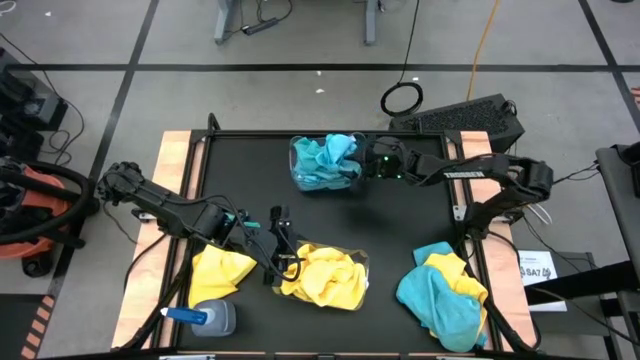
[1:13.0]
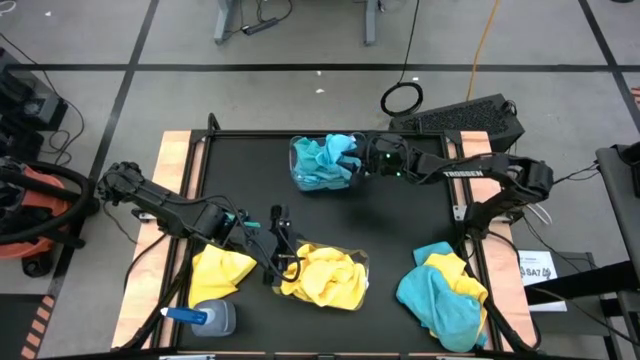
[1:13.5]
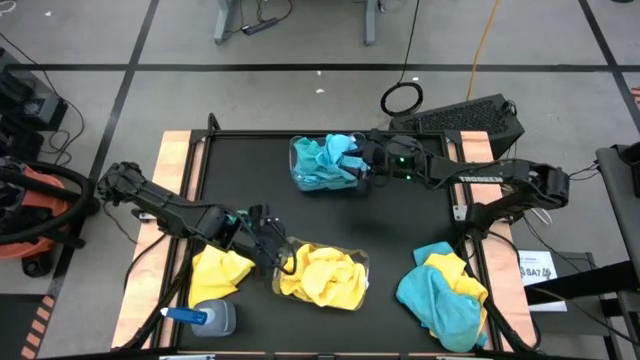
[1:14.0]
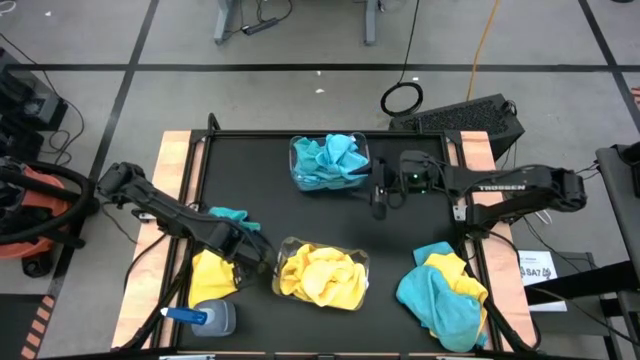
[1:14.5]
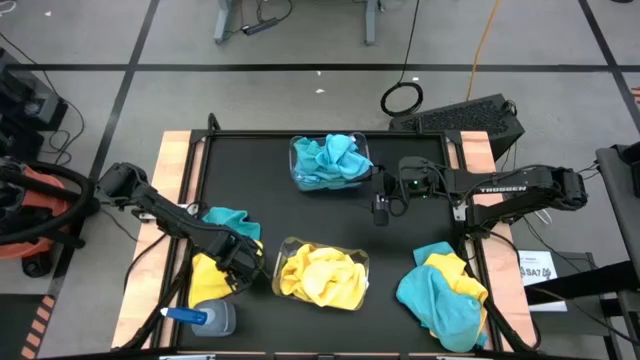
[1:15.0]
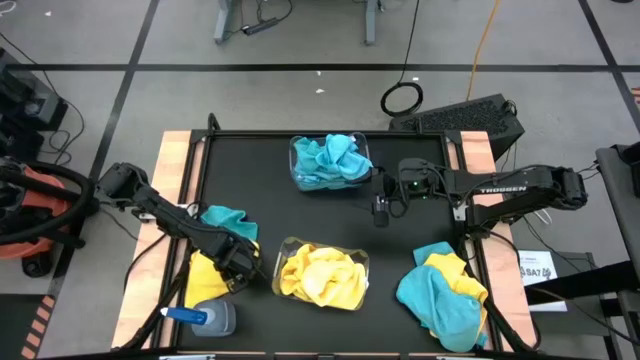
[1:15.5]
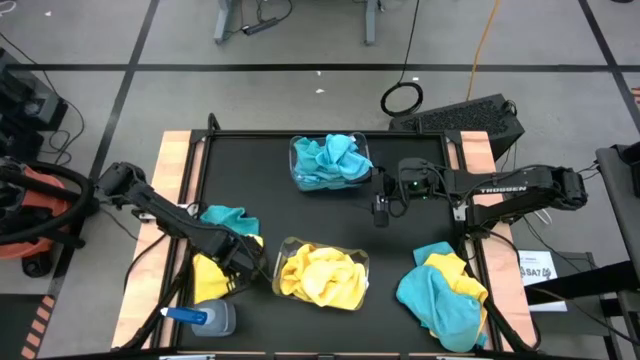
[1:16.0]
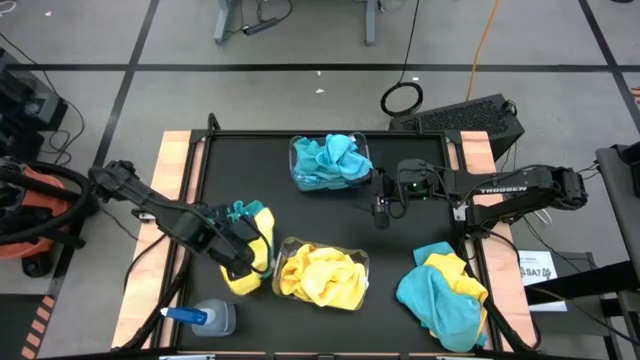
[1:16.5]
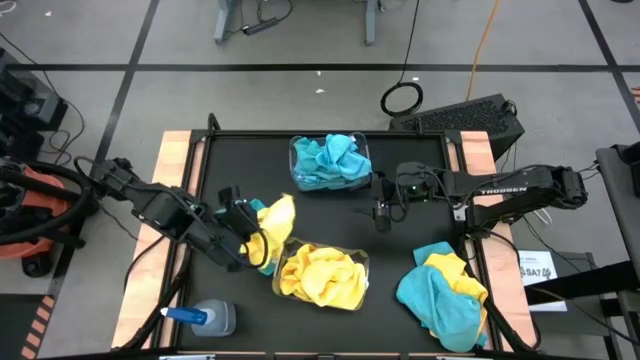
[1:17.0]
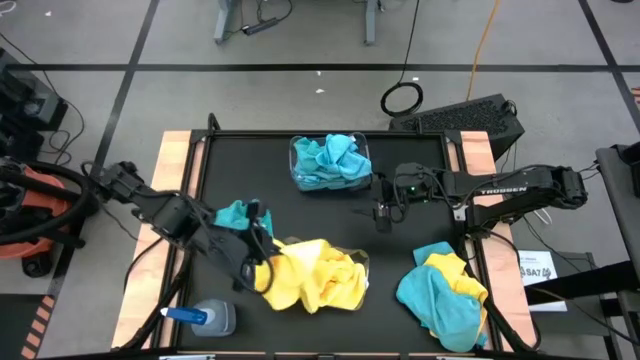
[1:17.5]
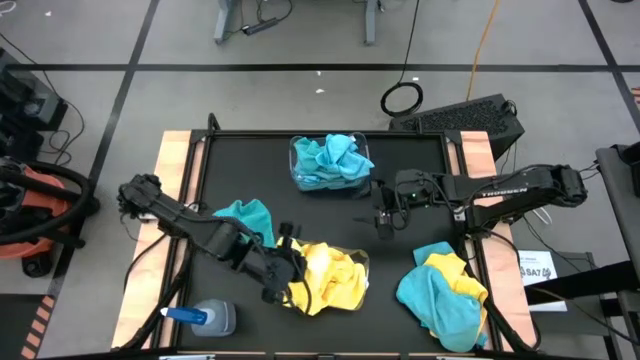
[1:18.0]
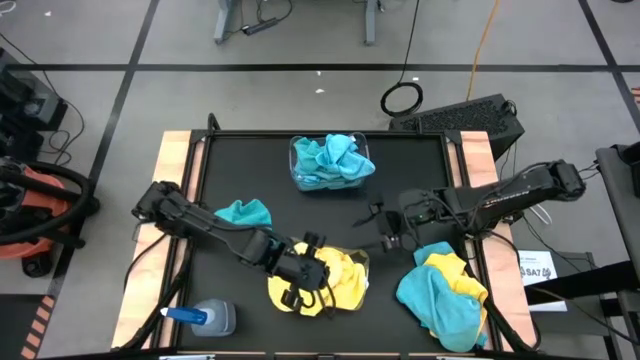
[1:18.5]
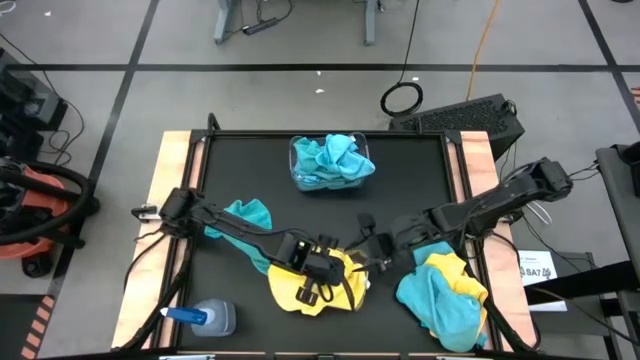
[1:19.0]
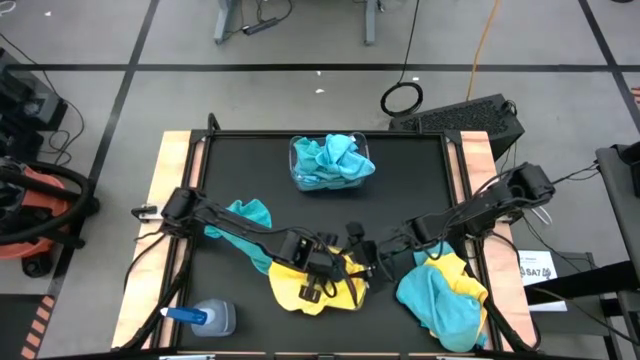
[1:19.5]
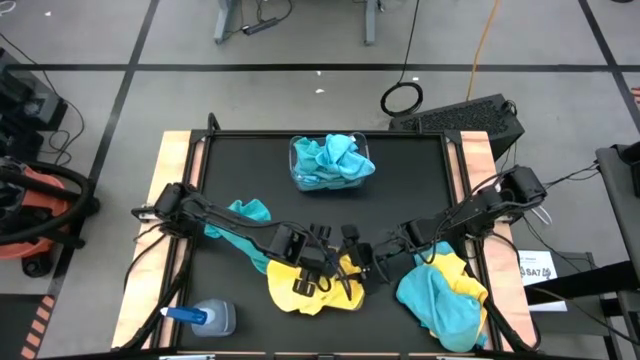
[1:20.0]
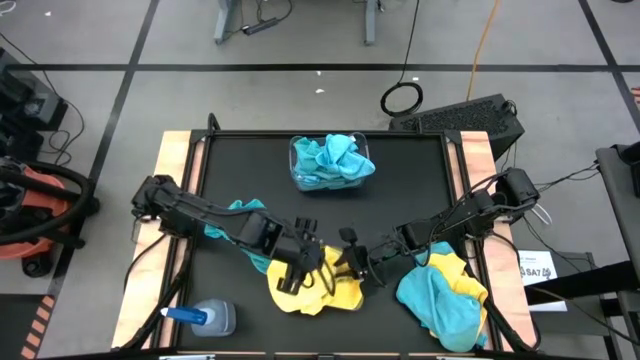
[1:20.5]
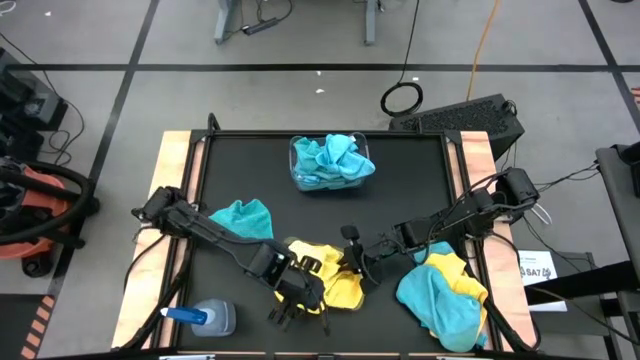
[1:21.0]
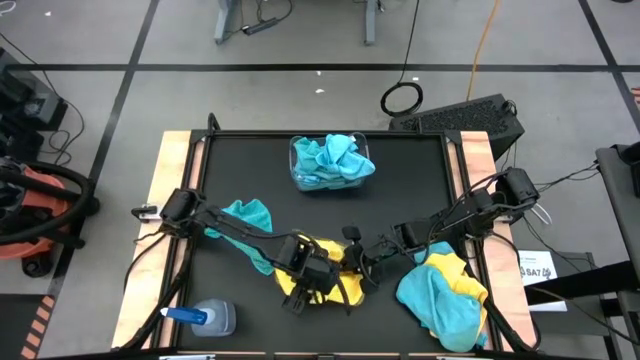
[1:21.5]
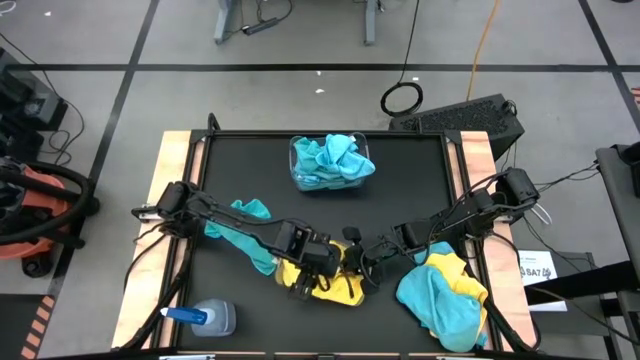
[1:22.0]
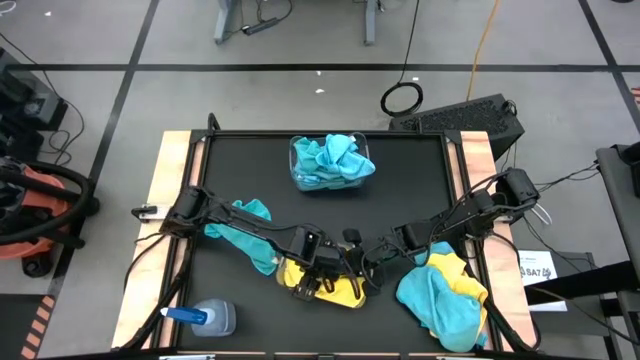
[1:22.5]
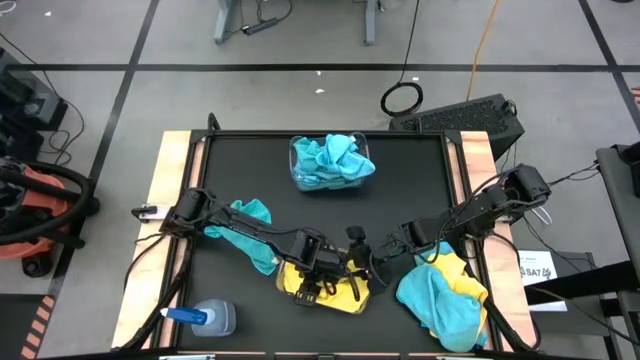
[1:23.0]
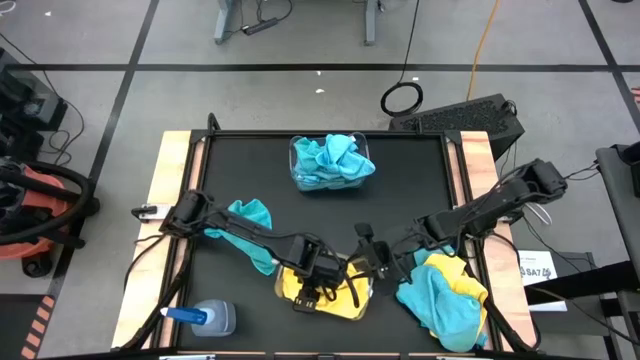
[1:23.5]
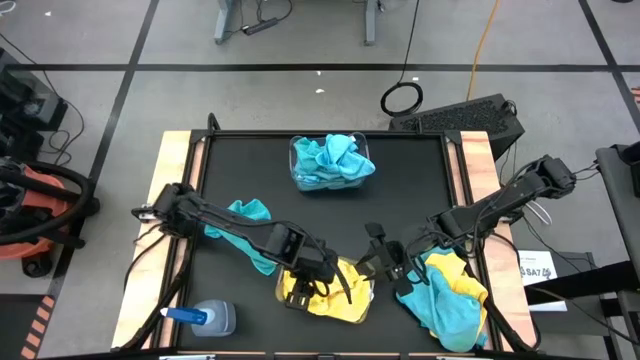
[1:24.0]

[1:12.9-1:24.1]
Task: Sort microfiber towel by color & place in baskets
Put the yellow microfiber towel into the bottom transparent bin

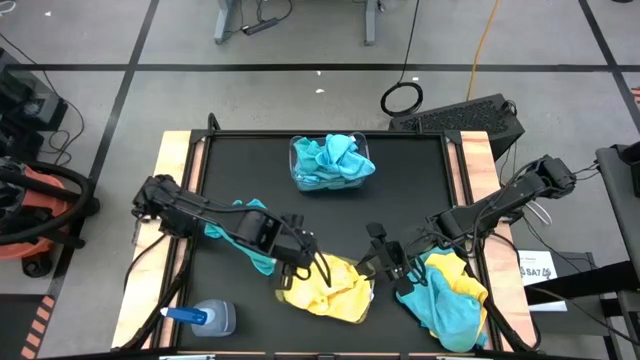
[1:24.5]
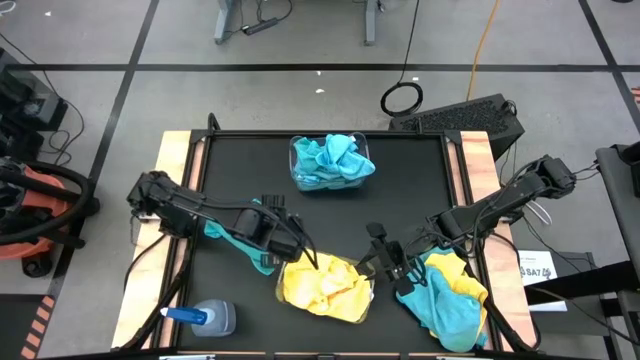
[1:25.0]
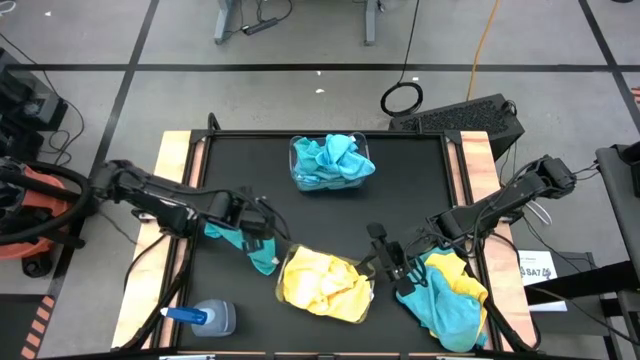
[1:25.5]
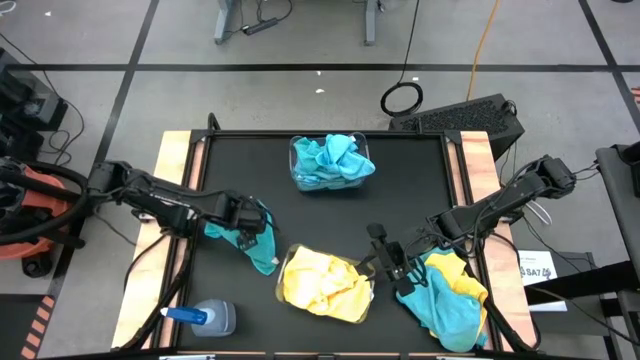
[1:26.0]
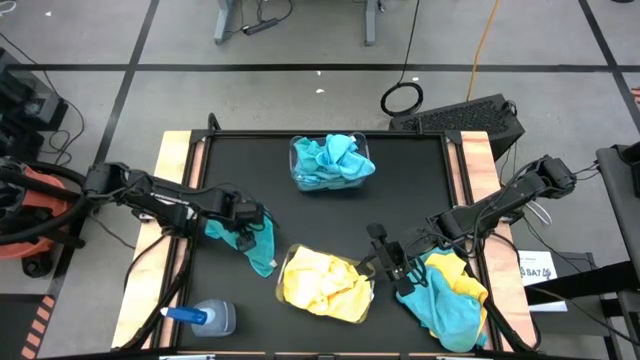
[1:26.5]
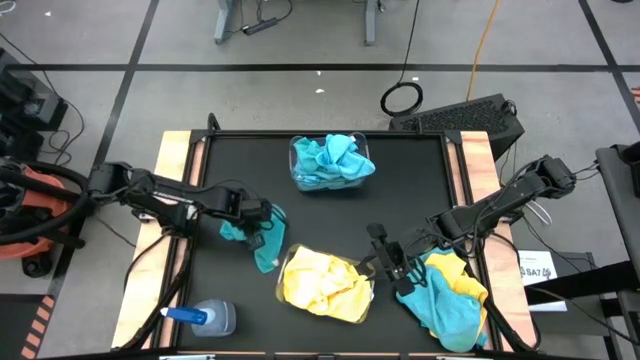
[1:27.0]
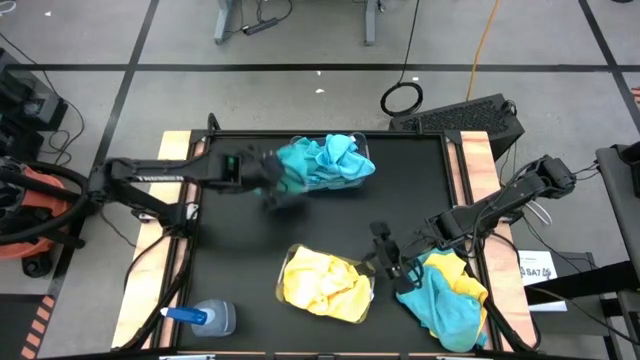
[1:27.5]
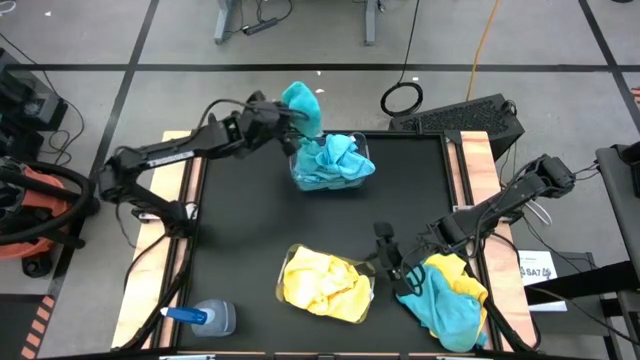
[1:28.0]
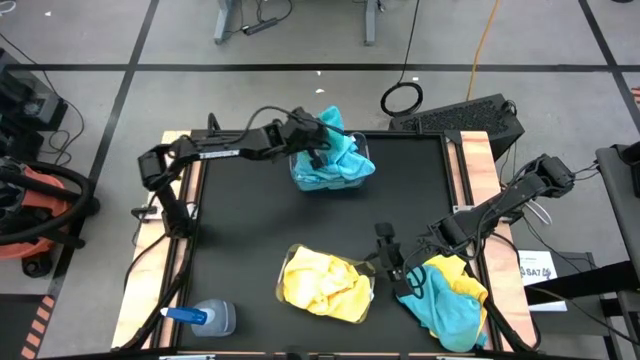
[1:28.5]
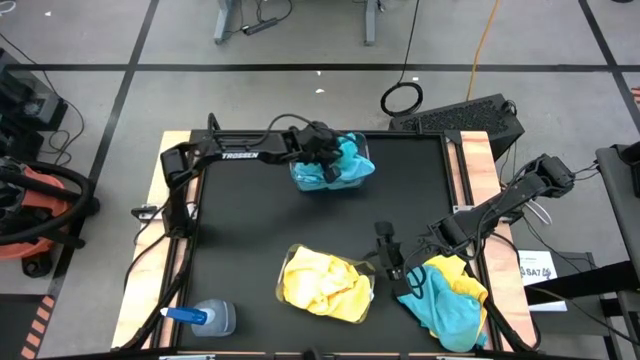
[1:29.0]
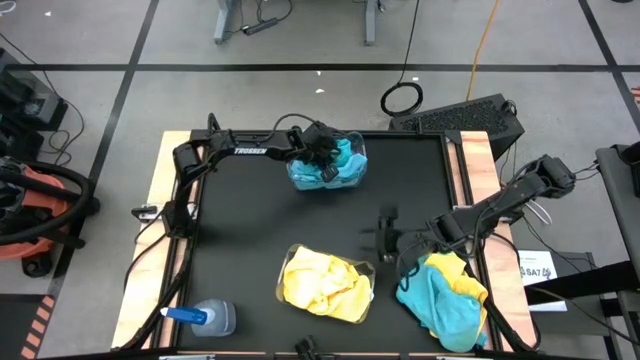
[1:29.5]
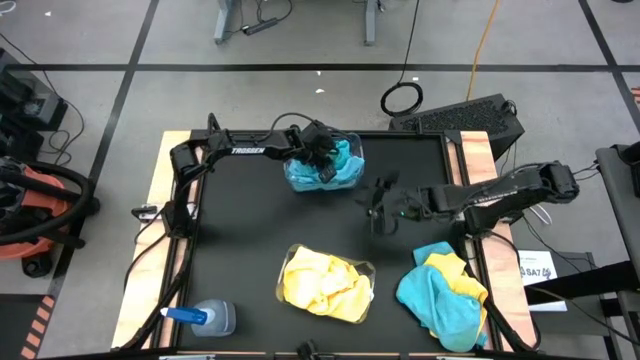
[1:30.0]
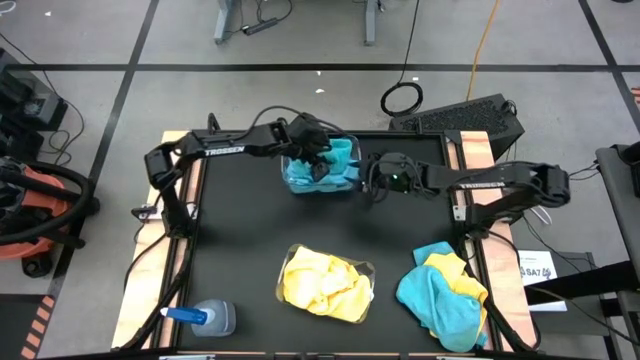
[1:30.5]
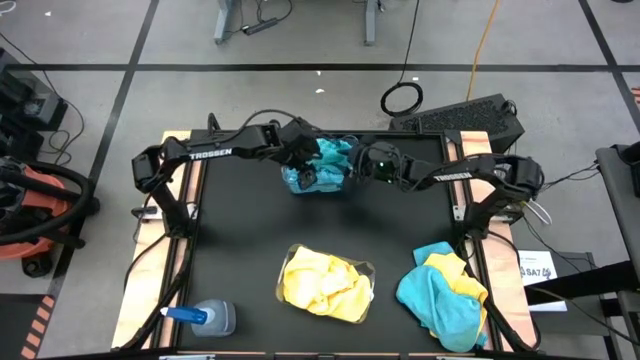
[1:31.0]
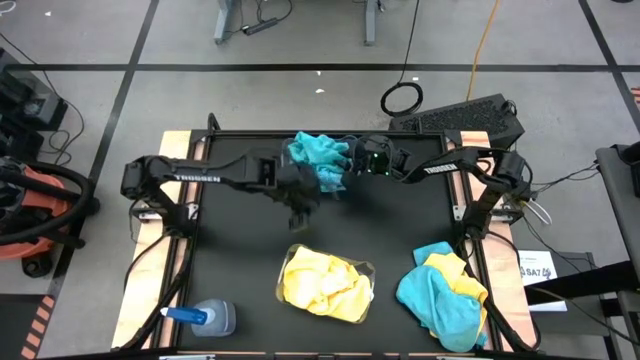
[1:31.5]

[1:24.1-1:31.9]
Put the blue microfiber towel into the top transparent bin

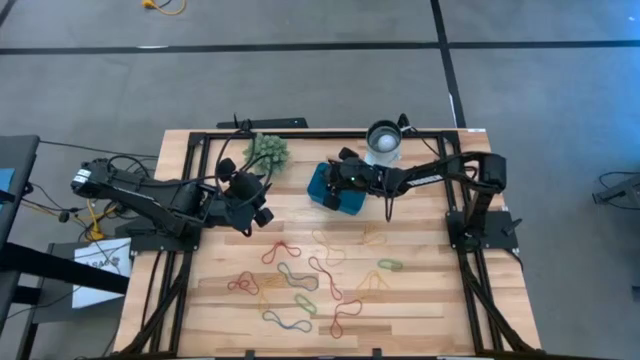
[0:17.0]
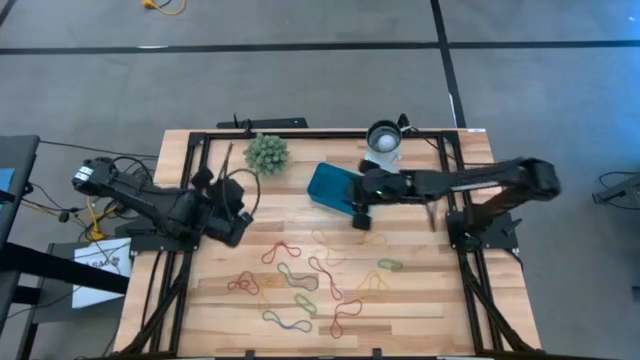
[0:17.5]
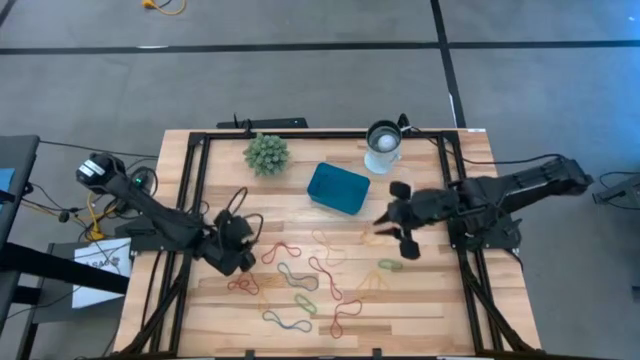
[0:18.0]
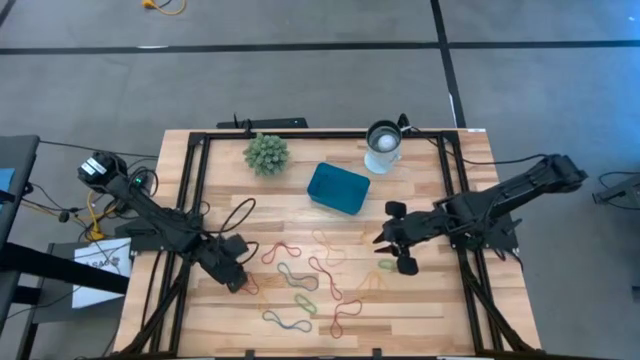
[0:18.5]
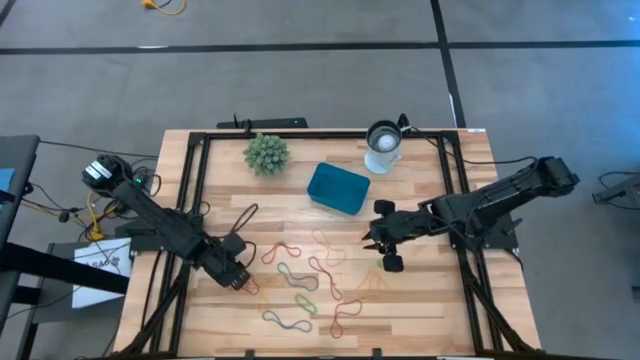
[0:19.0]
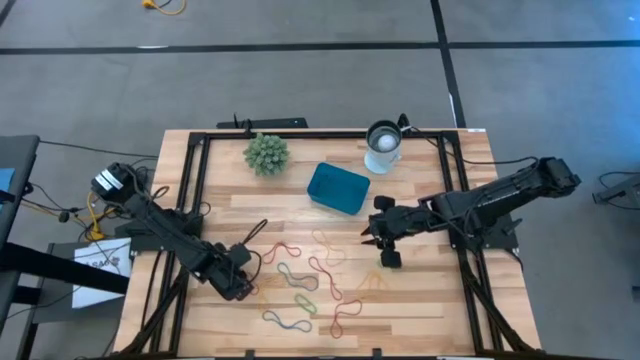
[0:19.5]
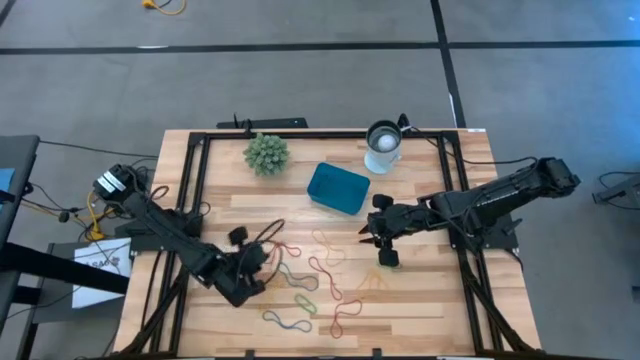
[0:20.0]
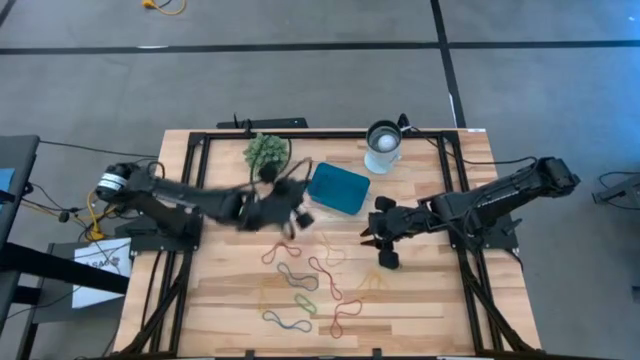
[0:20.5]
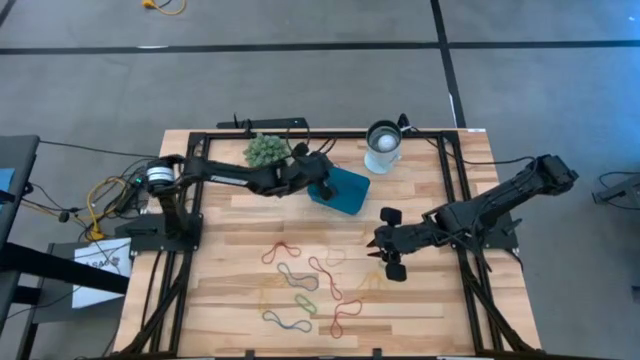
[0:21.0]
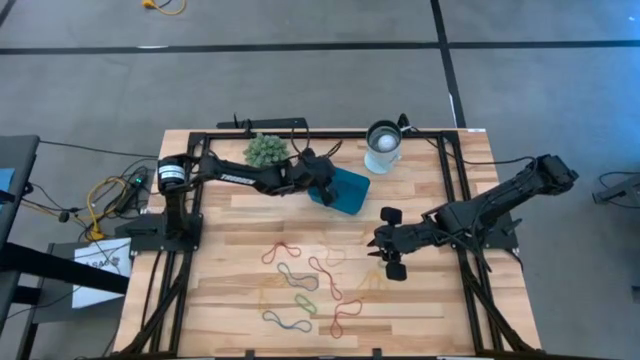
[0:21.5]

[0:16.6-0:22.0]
Task: Pick and place items into bin
Put the red rubber band into the blue bin
